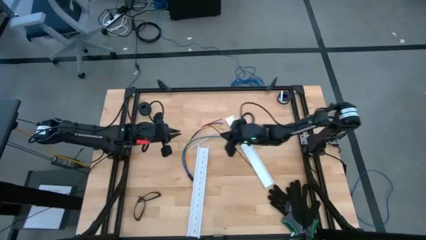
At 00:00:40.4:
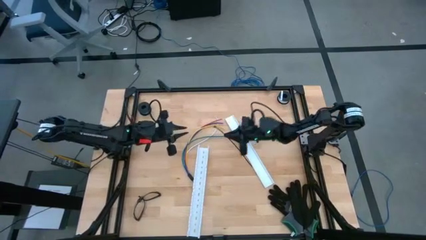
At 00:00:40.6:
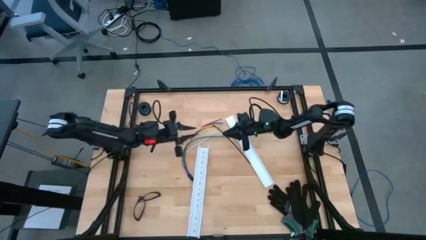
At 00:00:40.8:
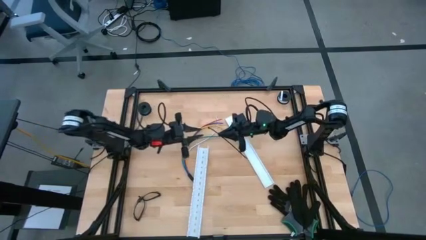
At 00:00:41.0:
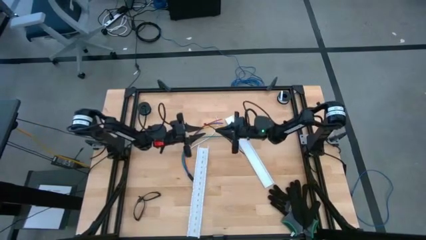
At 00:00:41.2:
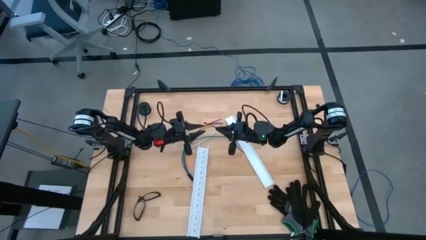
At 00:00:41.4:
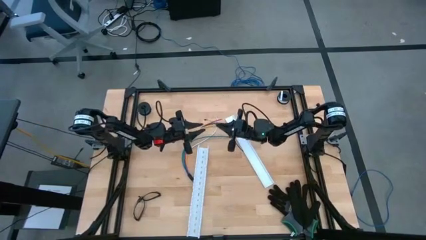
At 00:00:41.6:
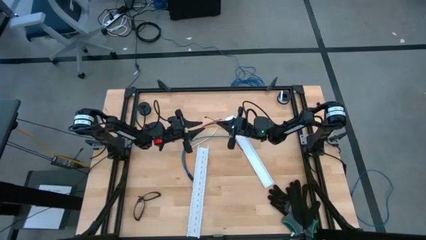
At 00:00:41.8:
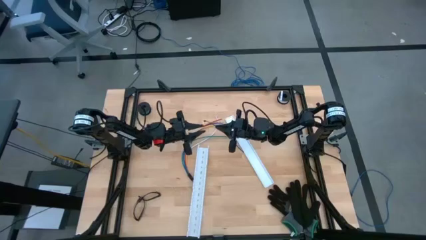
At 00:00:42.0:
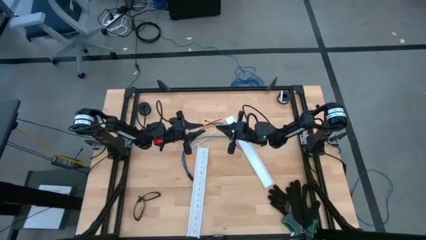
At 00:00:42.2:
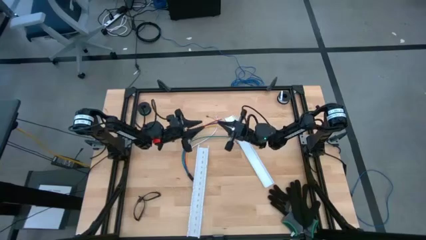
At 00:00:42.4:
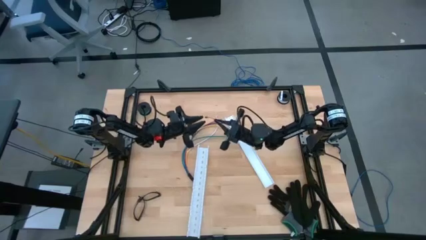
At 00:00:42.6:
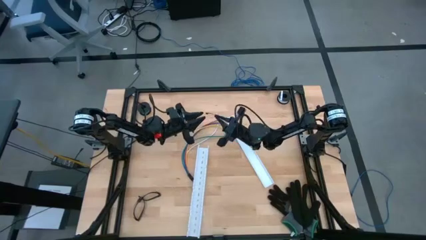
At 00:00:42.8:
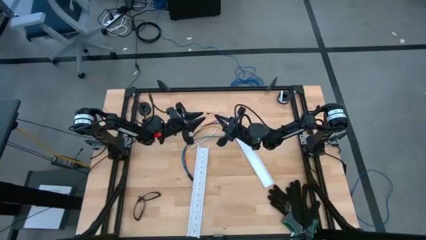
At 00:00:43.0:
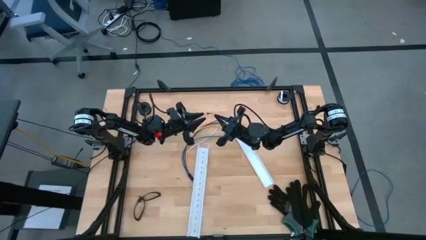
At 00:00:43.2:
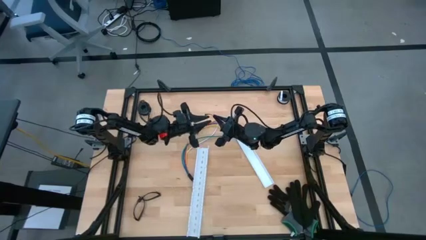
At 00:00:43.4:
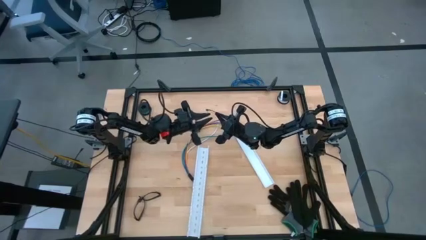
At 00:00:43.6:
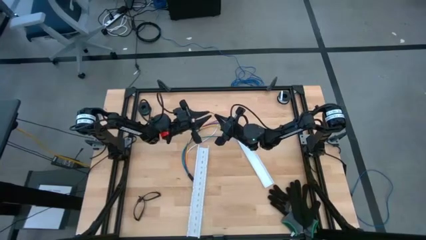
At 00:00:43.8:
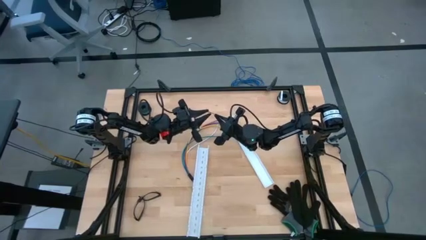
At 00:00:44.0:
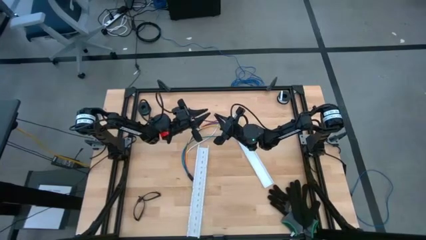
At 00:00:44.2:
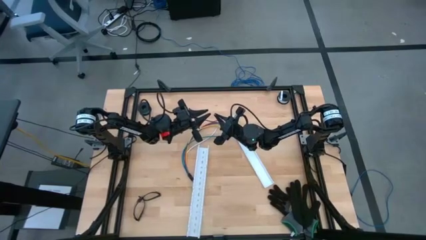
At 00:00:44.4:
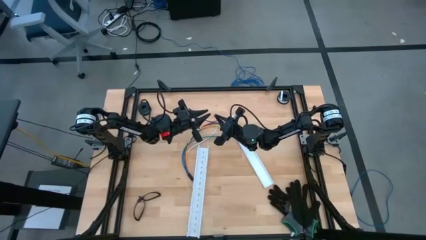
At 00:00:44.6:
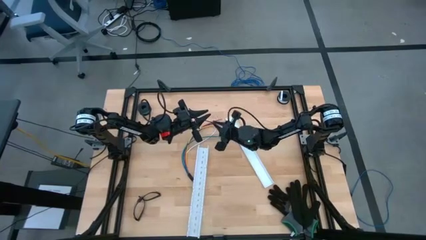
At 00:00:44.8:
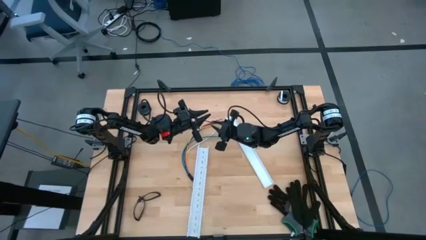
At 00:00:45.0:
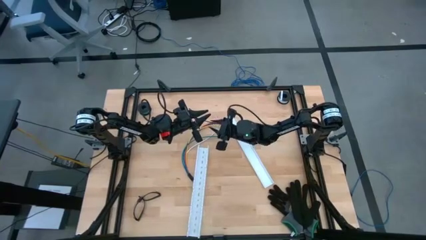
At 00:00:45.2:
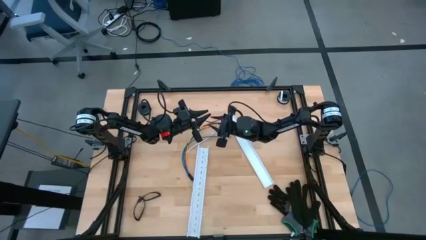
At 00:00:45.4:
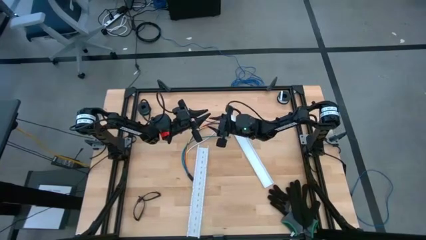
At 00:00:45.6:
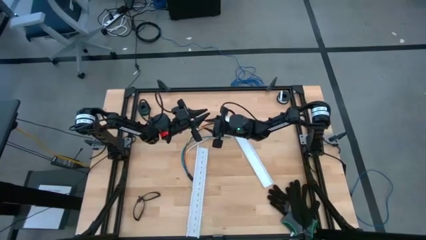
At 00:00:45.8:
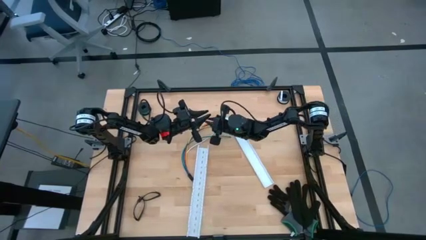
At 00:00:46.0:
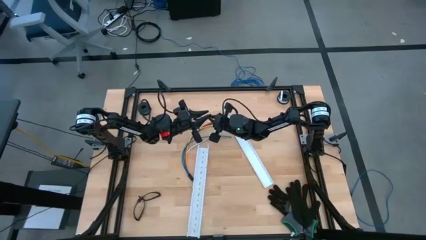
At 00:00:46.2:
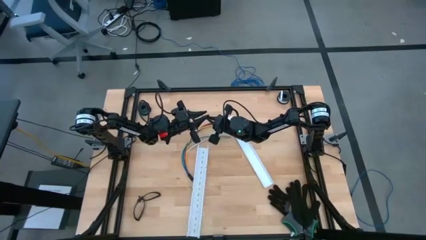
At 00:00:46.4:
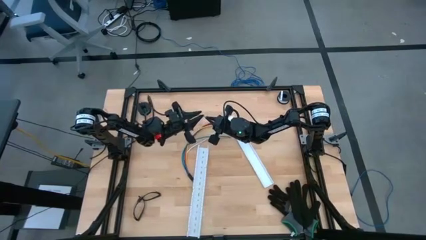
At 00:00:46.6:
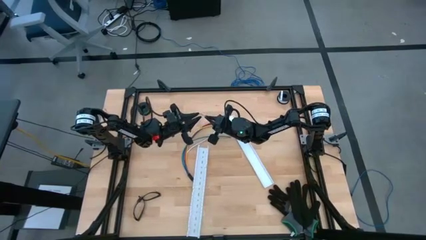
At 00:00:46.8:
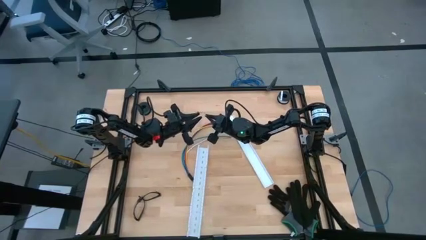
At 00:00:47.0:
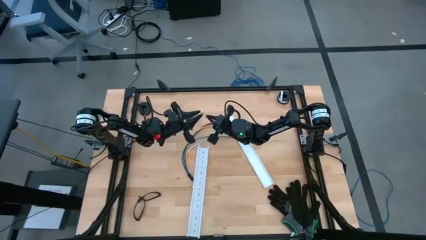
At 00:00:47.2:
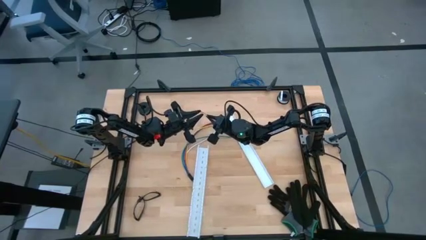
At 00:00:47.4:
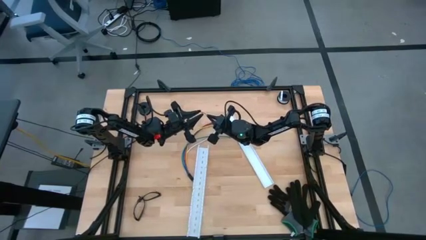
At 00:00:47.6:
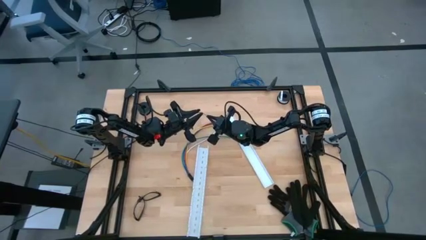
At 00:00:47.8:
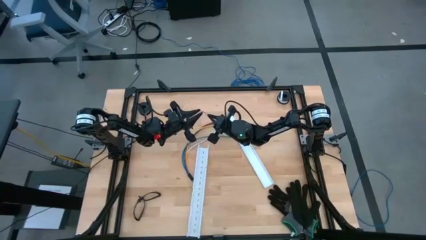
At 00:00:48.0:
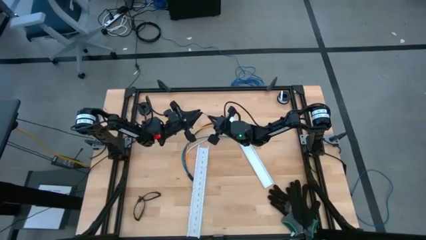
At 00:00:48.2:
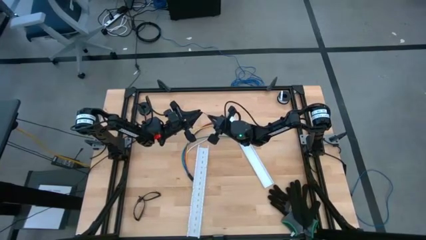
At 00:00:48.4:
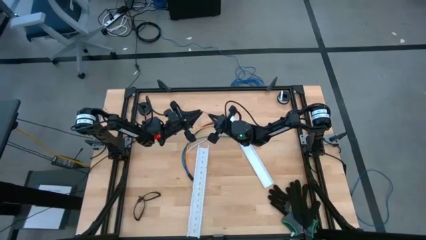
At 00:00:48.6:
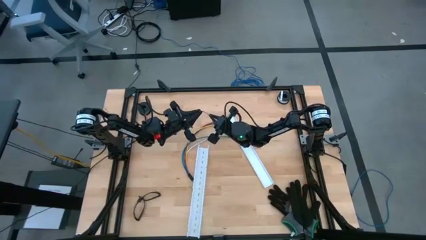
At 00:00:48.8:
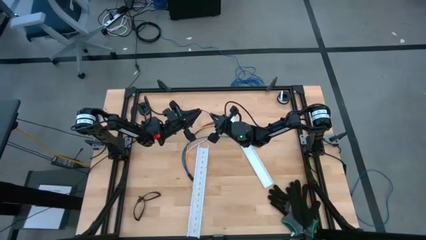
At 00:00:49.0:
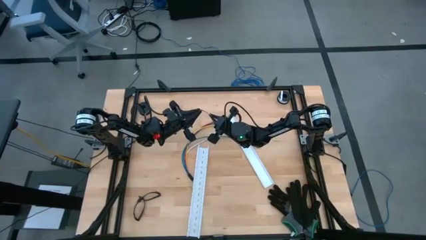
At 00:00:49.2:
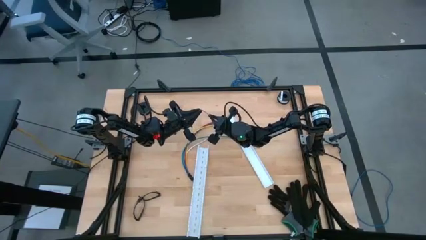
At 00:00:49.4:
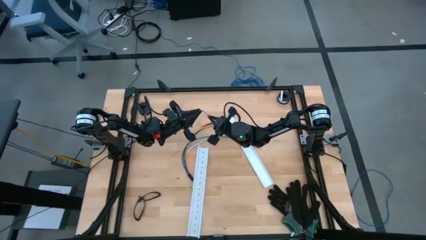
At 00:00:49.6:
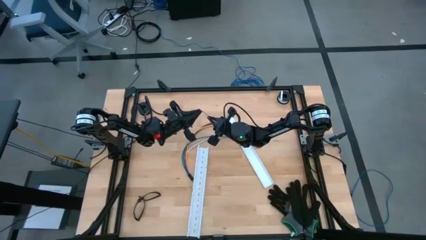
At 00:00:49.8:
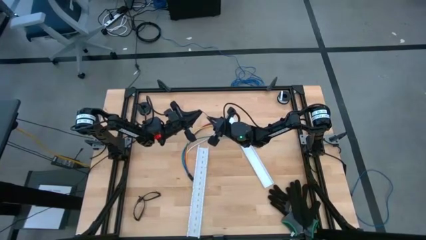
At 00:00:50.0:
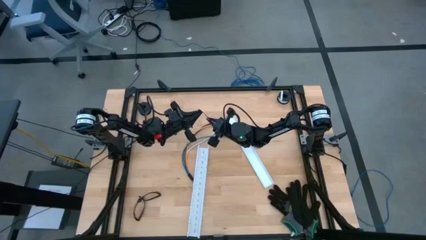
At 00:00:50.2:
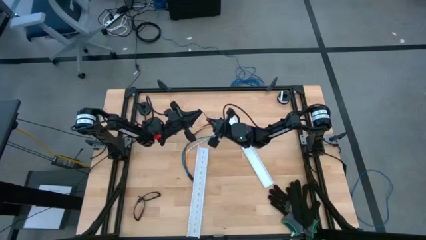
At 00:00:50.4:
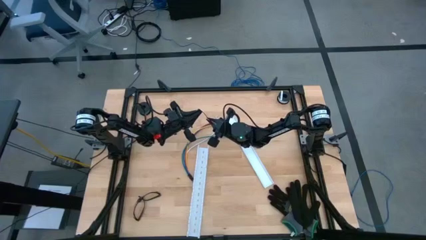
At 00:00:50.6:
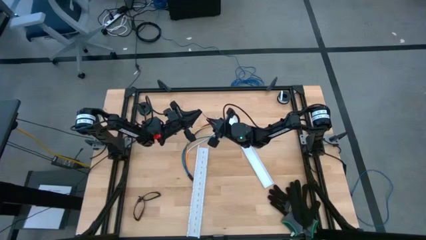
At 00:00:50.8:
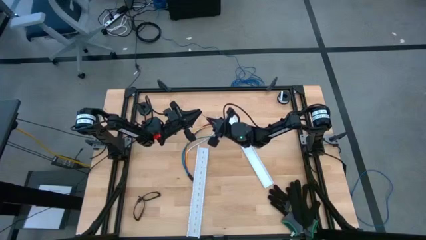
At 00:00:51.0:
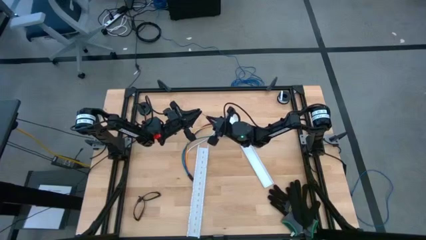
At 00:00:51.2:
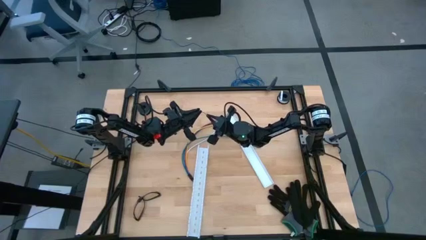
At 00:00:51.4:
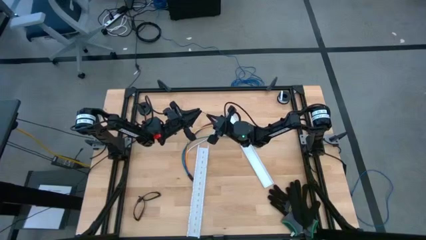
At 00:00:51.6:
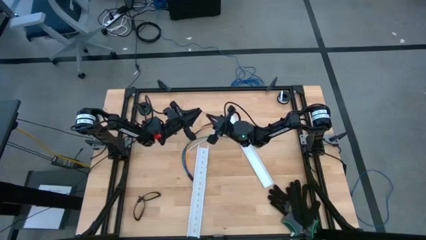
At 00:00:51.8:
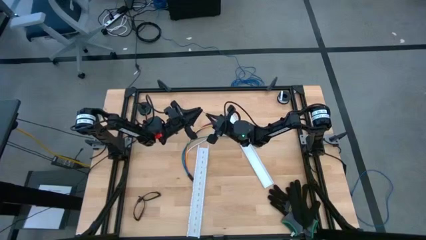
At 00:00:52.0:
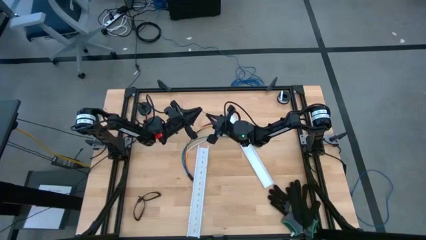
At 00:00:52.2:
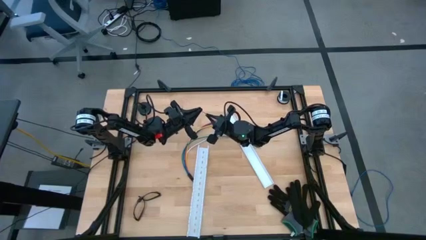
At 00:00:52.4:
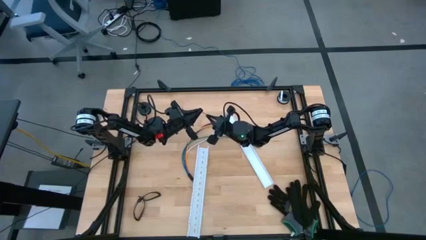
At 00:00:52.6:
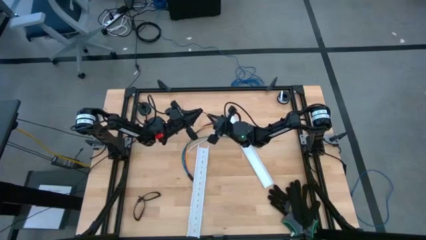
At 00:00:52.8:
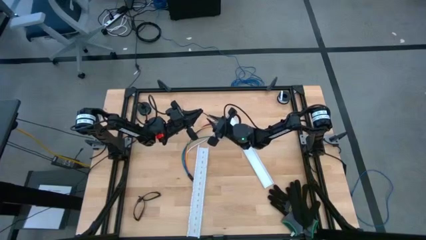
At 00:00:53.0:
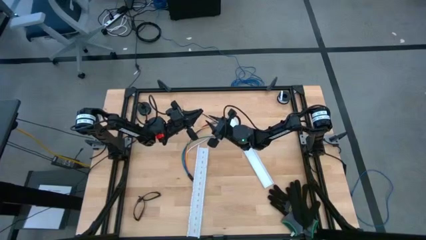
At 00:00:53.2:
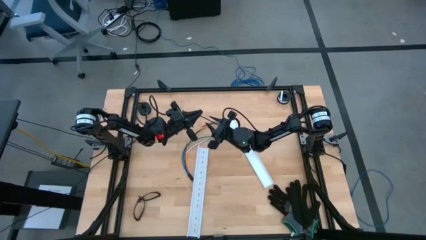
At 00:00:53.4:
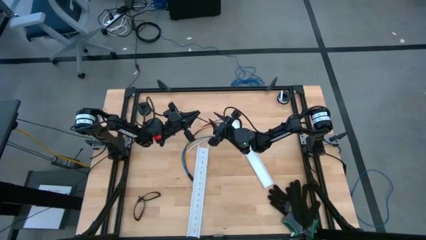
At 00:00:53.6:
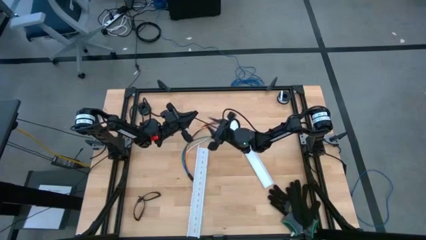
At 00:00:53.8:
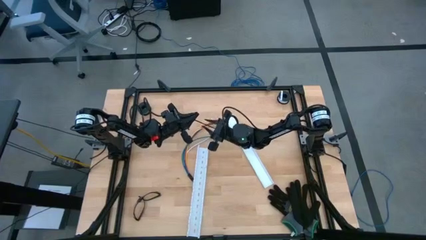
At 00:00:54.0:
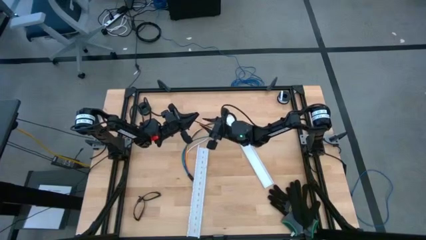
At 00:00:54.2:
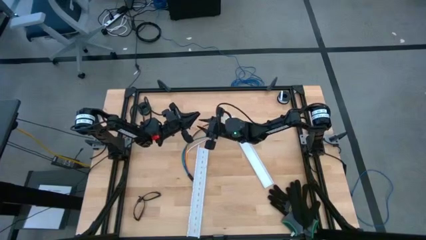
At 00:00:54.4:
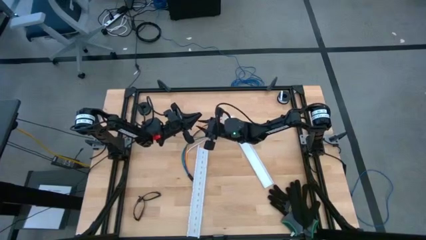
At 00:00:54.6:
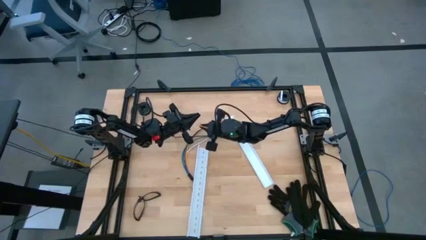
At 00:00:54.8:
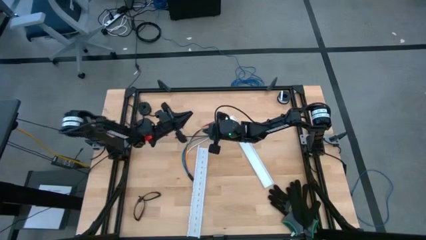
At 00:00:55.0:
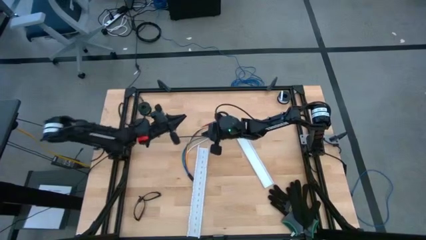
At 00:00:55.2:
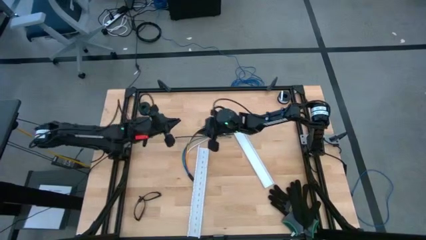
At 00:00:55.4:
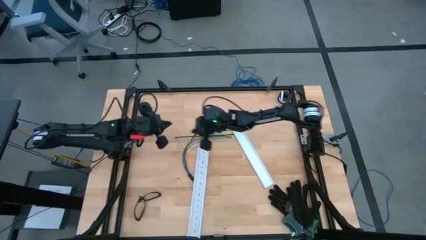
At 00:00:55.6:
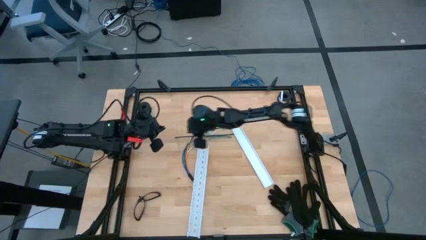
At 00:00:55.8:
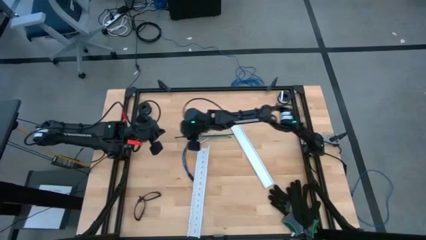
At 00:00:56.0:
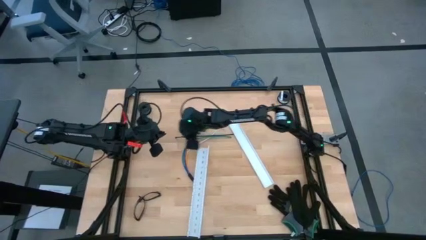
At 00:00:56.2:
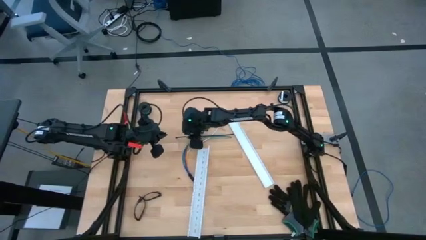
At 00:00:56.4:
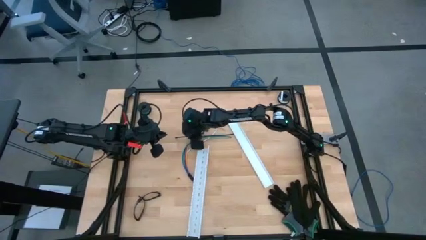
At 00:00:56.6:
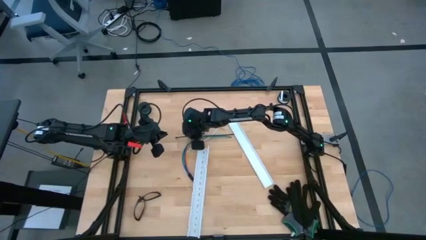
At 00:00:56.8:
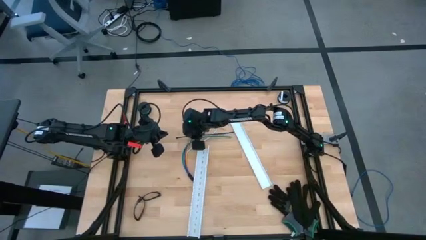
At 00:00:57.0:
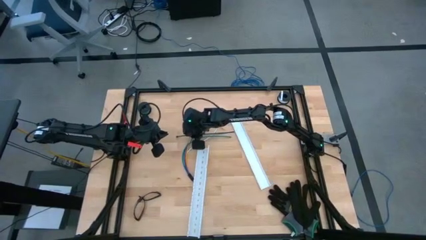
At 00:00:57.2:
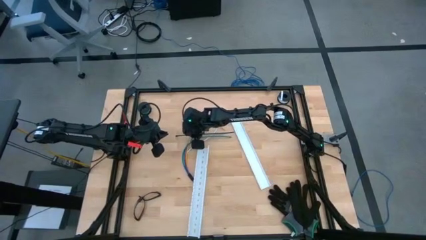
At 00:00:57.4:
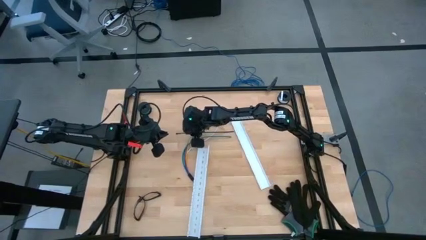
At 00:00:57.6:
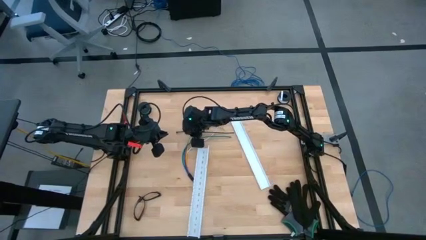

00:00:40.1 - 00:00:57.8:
Task: Ziptie cables
Wrap the black zip tie around the object
